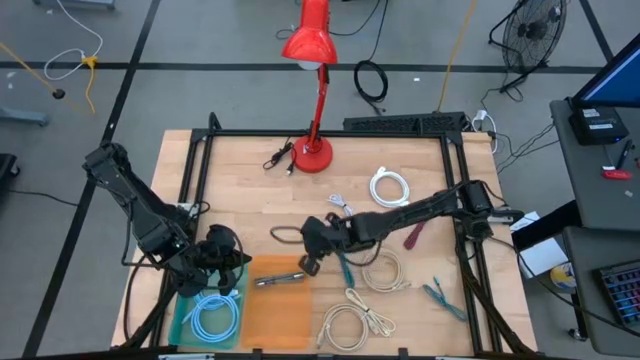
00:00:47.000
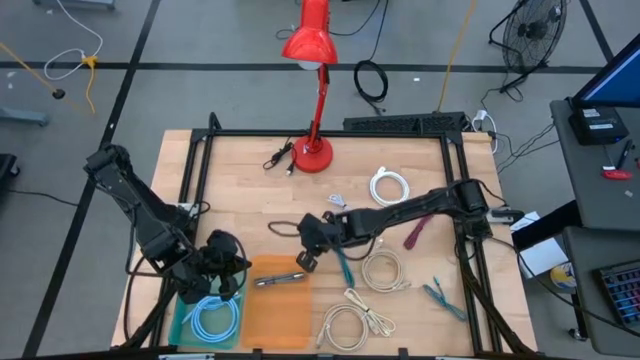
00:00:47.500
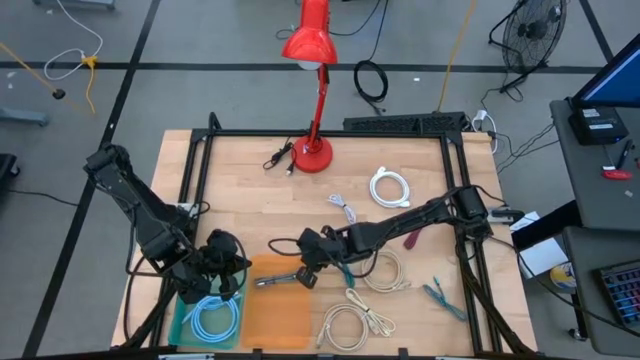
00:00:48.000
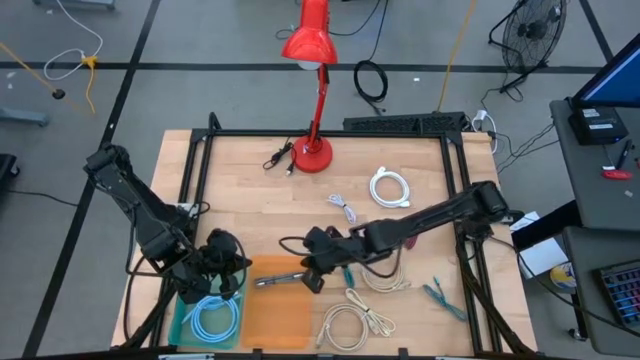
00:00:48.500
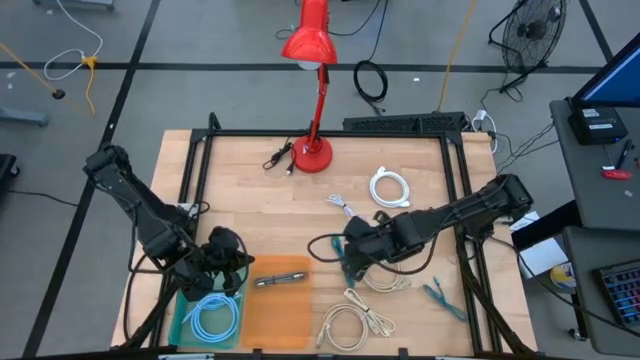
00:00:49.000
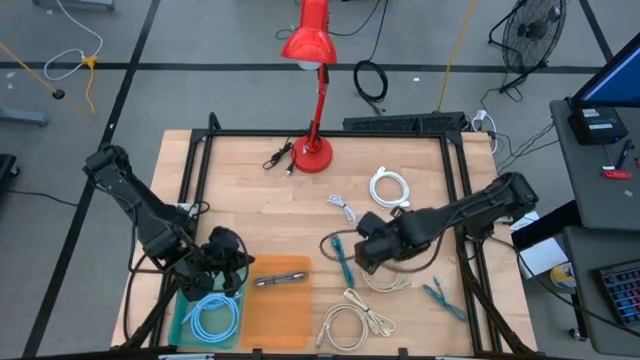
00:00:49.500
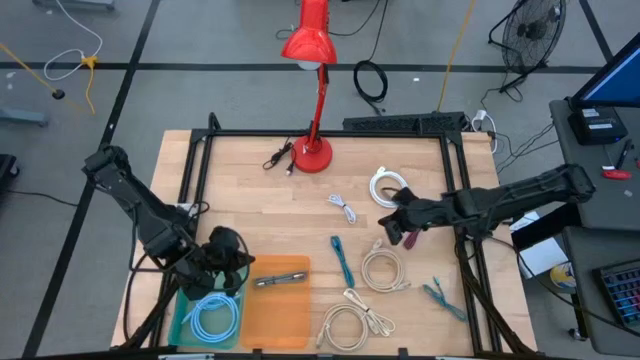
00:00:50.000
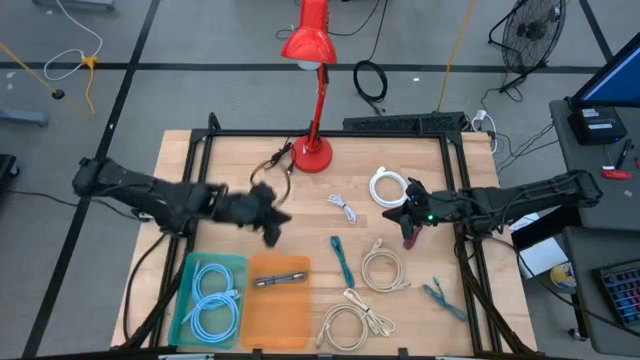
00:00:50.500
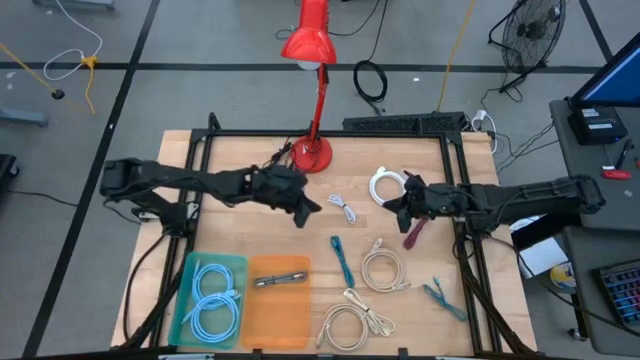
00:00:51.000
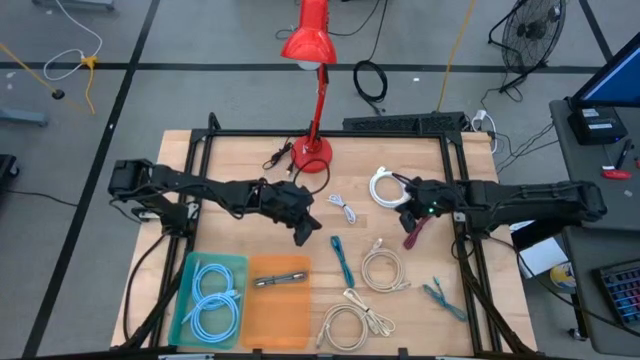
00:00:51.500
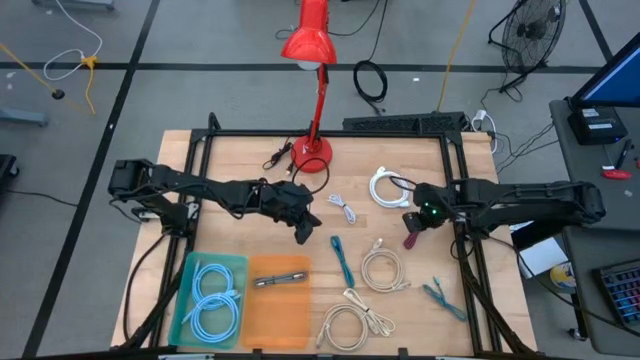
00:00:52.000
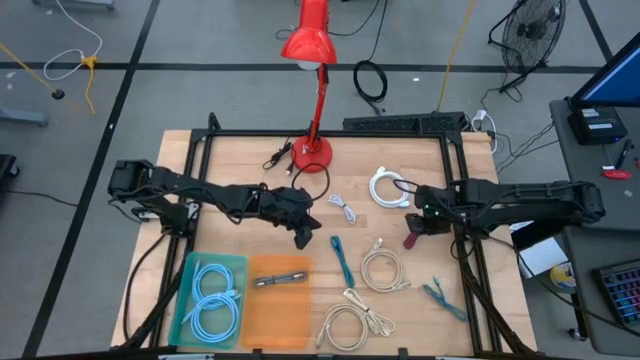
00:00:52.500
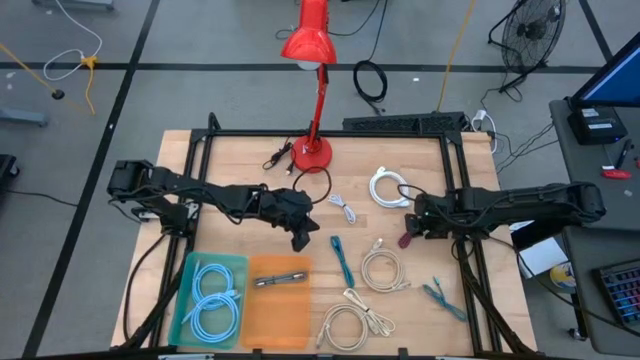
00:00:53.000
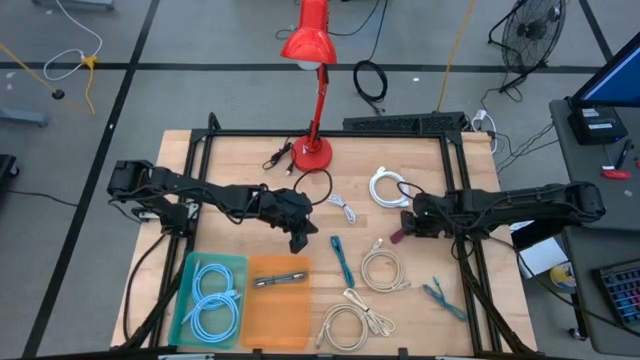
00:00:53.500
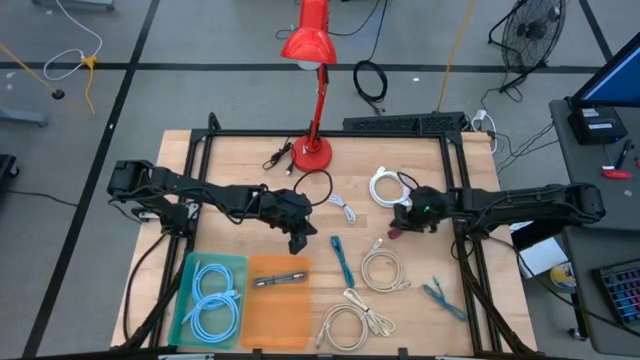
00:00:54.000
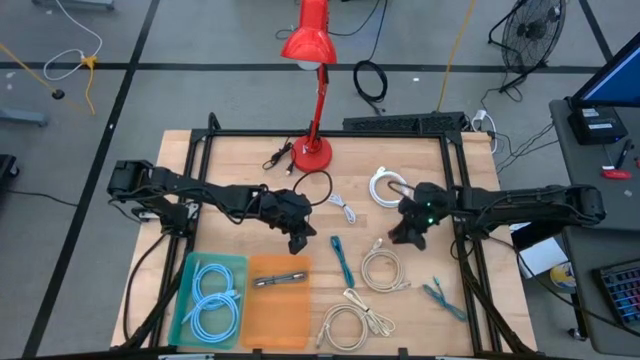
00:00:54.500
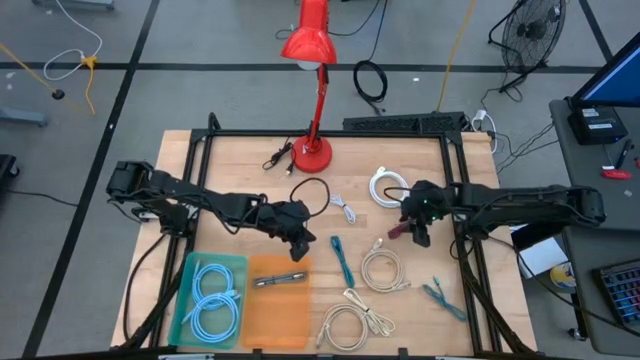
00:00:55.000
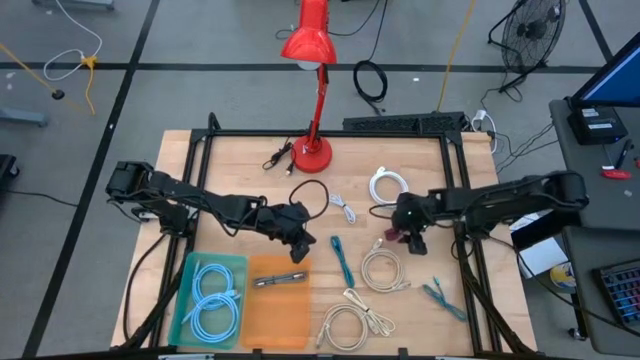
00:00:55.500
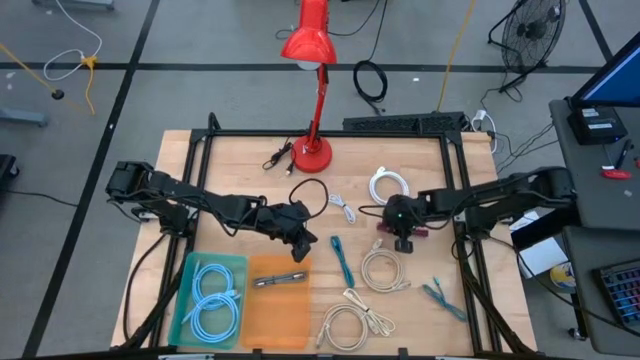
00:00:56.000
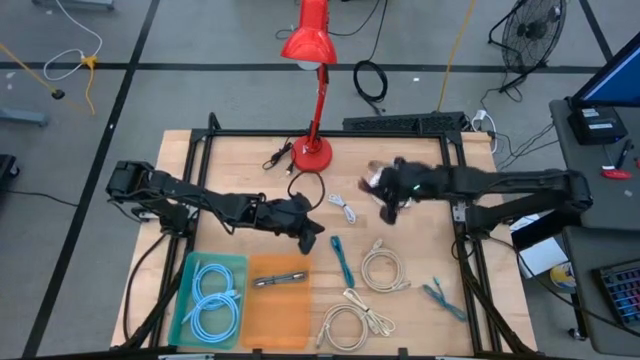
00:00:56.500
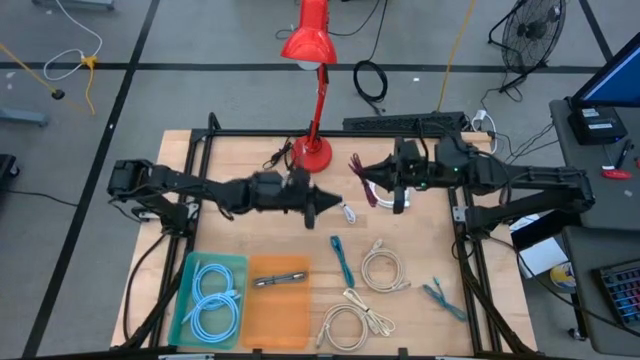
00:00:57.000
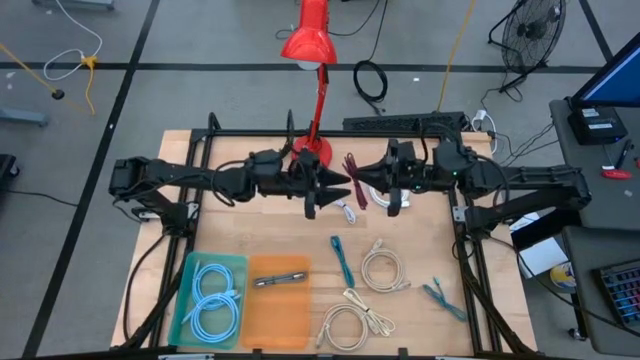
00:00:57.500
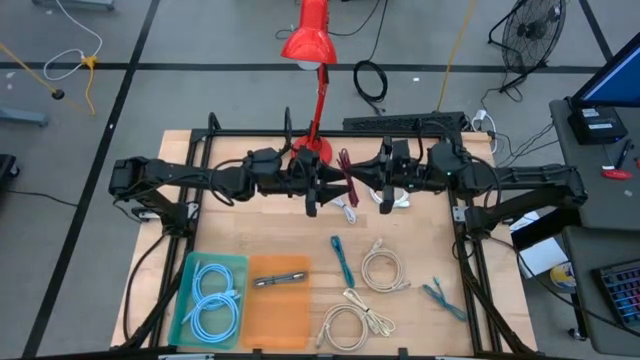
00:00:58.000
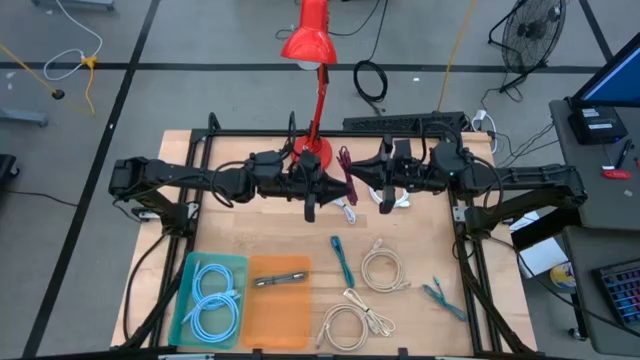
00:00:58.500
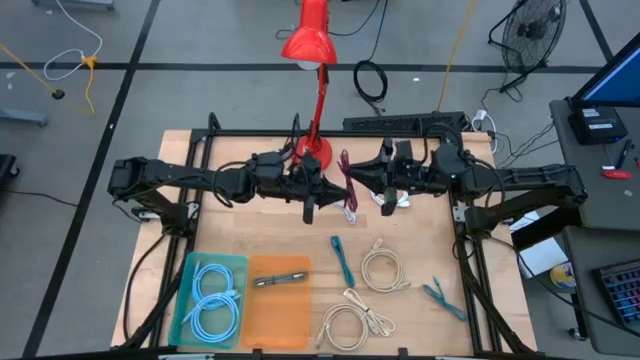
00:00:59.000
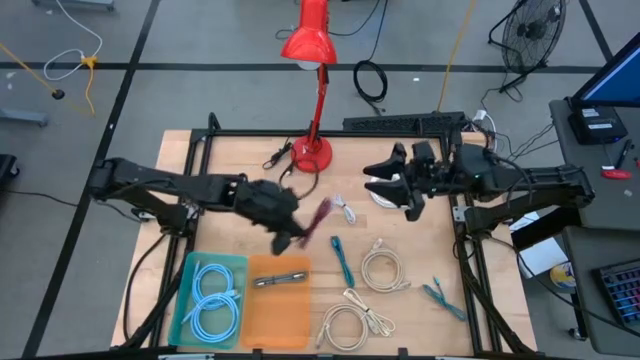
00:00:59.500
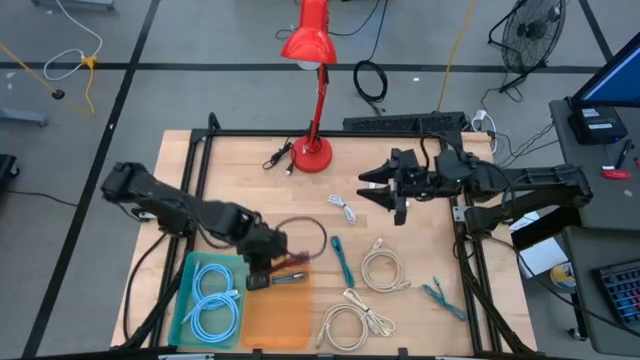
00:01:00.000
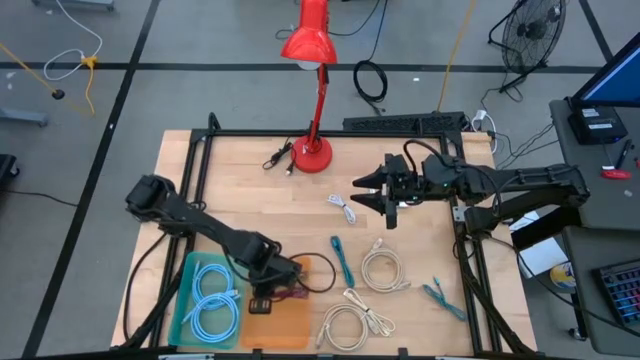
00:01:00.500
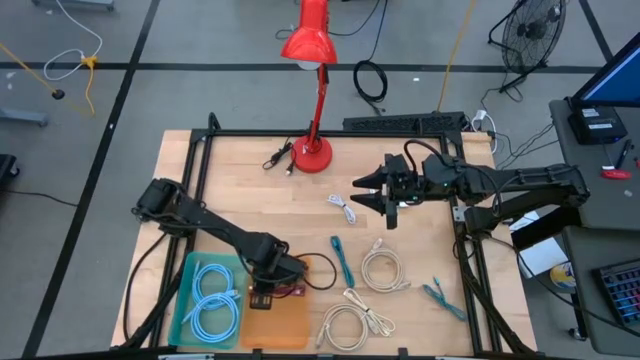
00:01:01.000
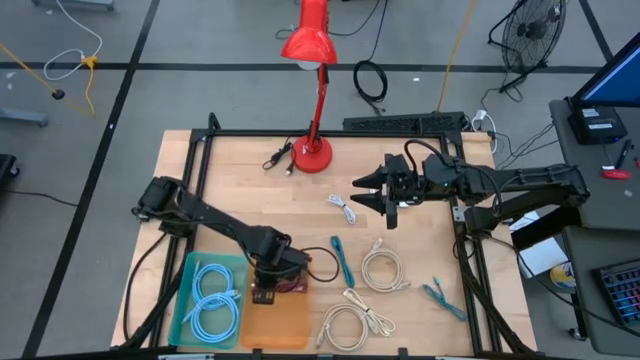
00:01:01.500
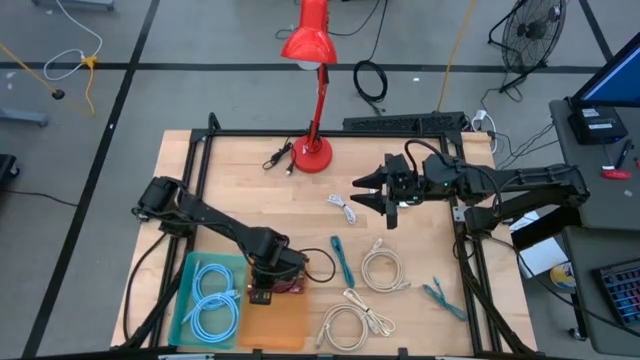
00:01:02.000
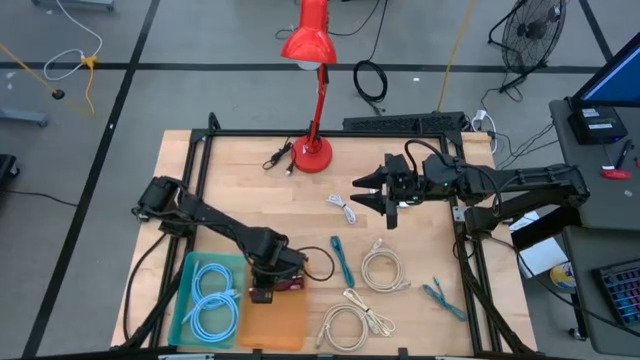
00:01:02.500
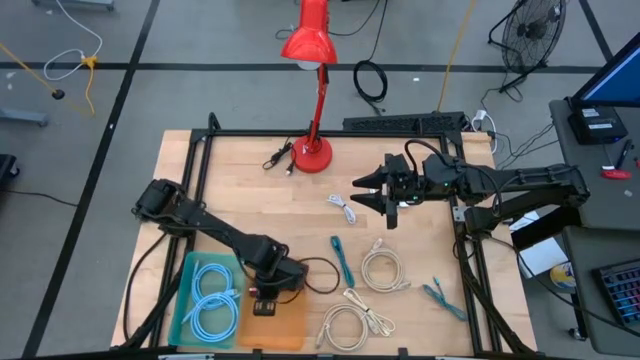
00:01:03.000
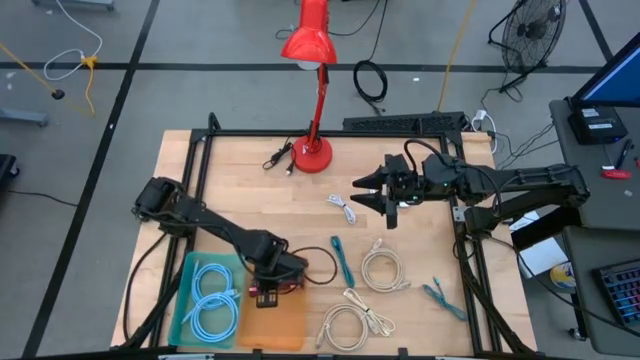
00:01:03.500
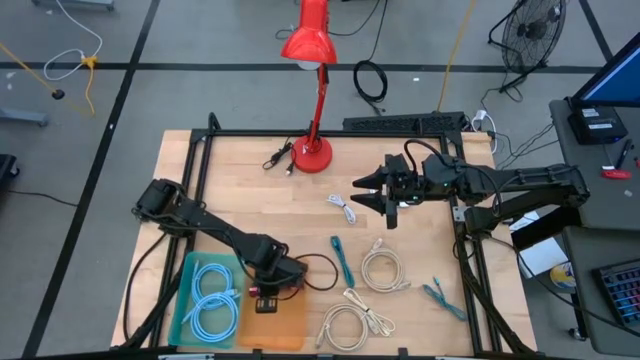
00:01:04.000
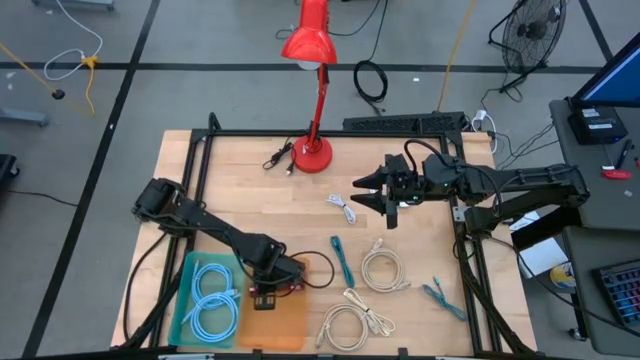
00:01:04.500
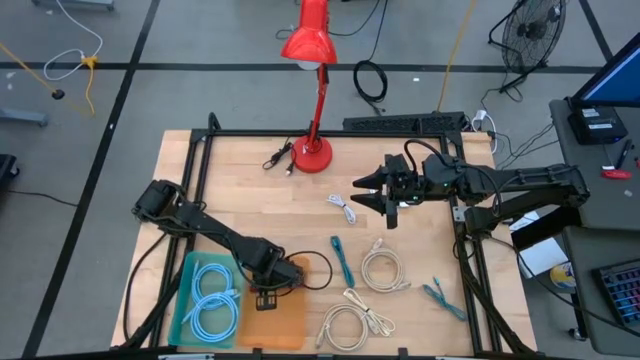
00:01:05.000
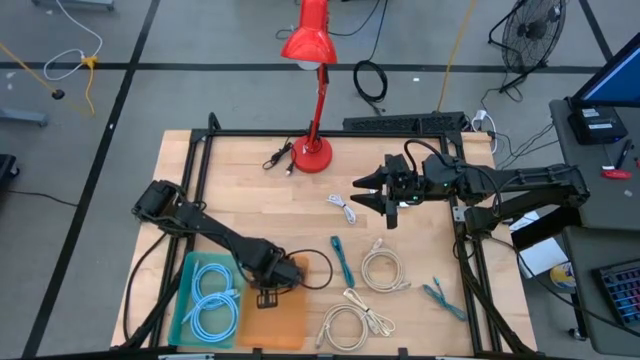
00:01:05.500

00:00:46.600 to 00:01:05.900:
Task: Pick & Place USB Port
Put the pink USB cable into the orange bin
